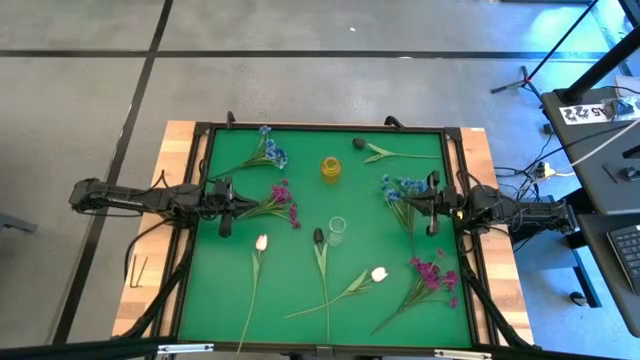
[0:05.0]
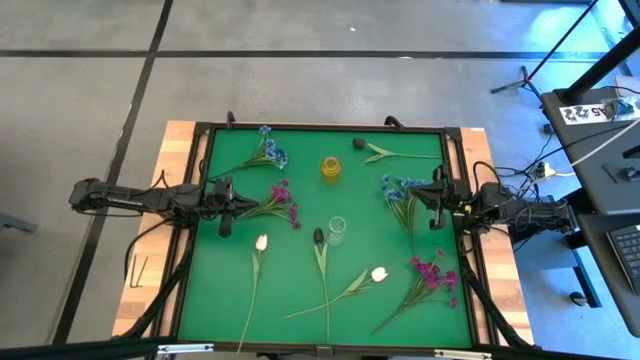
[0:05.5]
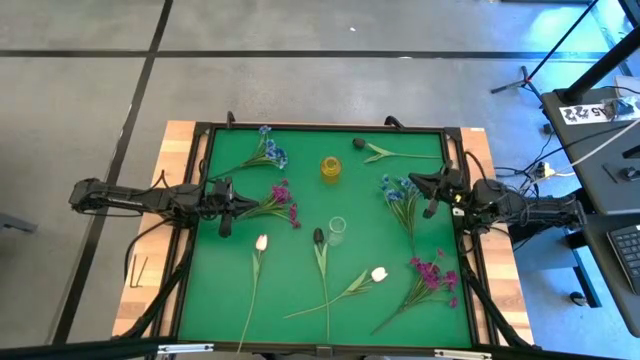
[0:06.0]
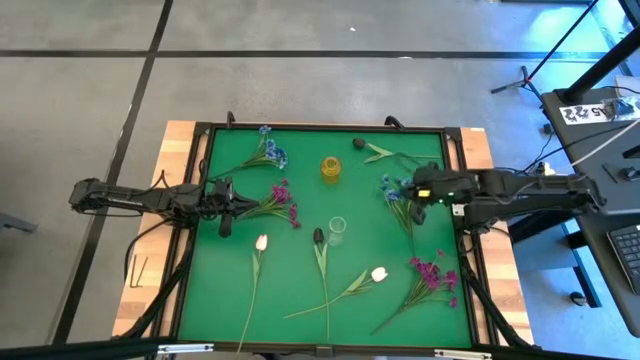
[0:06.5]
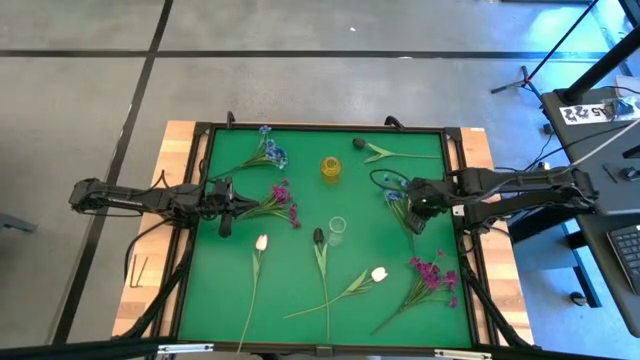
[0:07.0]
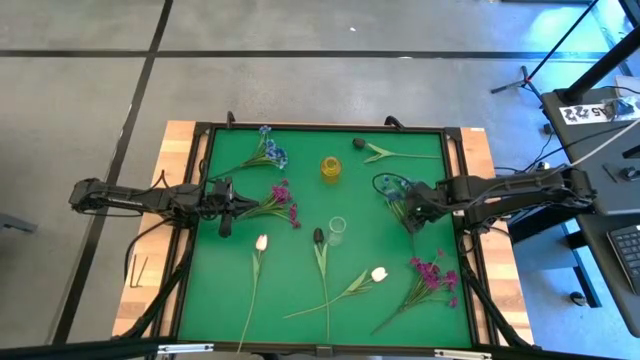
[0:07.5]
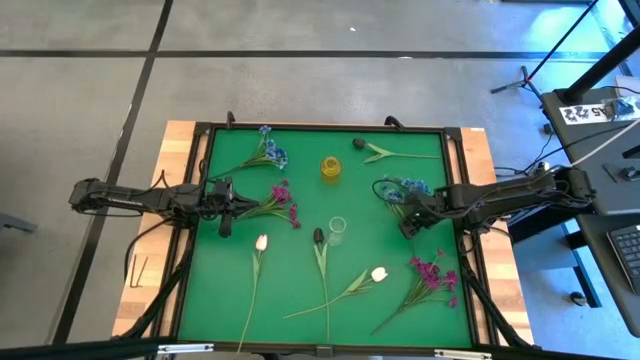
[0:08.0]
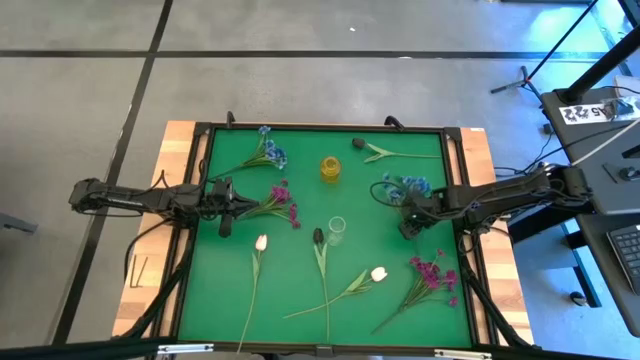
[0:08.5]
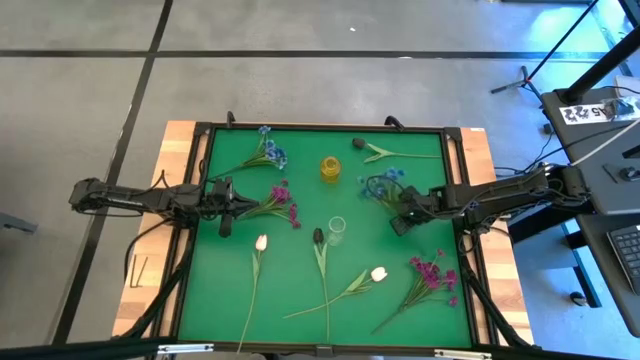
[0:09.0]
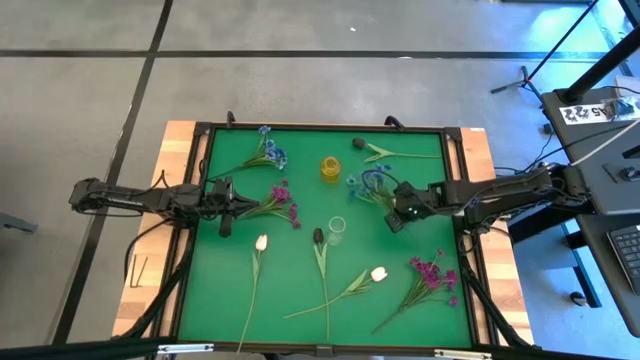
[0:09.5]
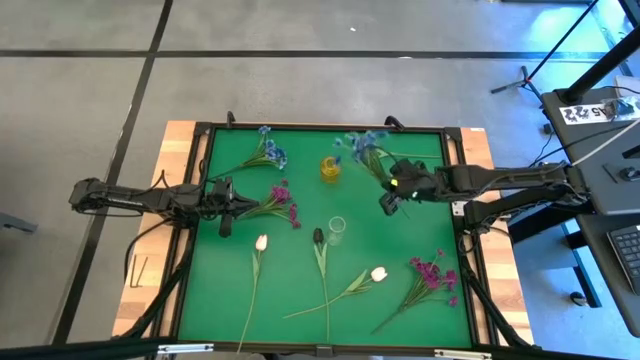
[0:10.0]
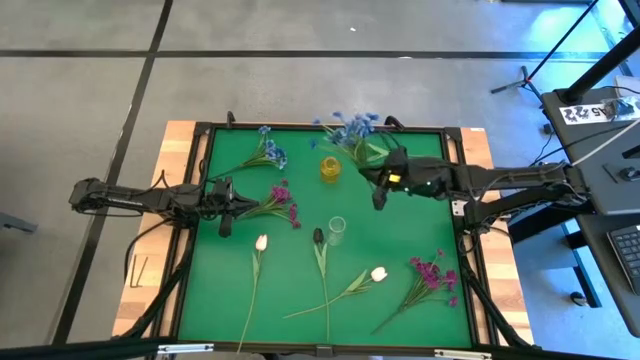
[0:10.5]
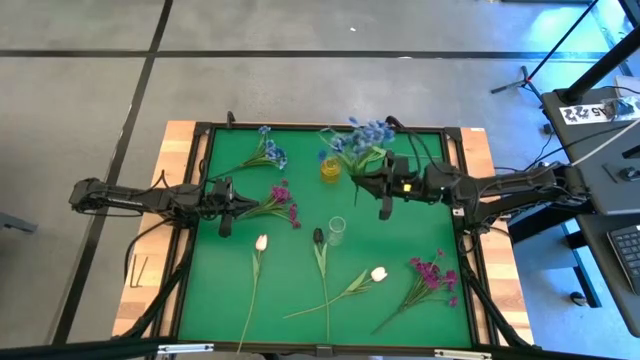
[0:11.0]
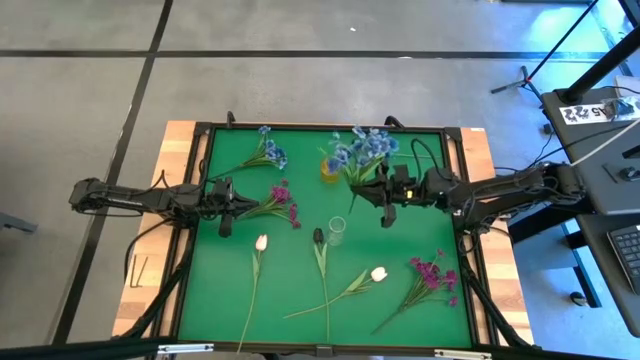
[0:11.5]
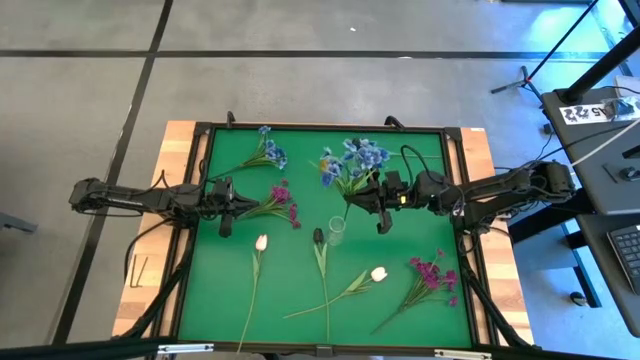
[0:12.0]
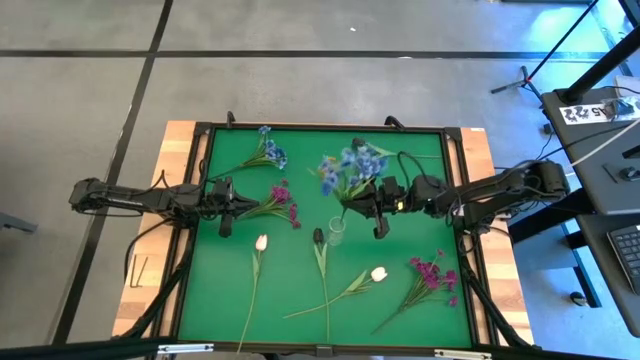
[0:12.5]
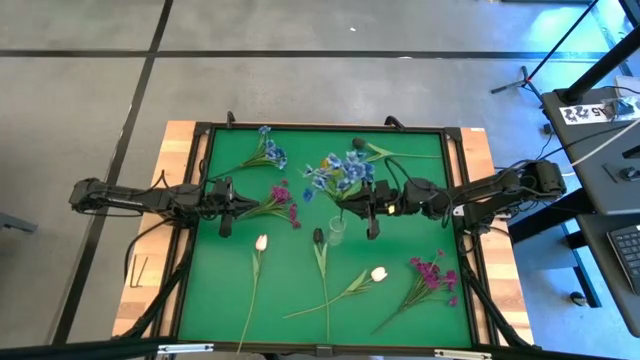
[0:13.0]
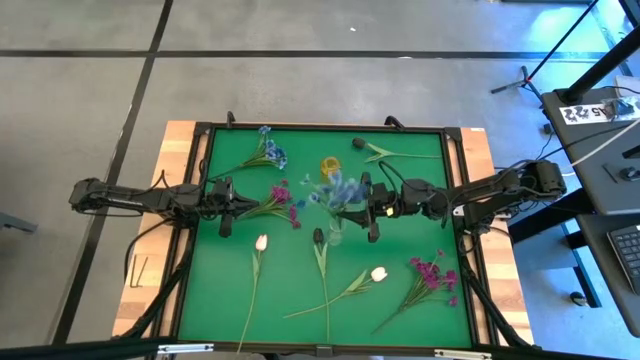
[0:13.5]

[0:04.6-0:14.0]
Task: Sort flowers into vase by color
Put the right blue flowers into the transparent vase

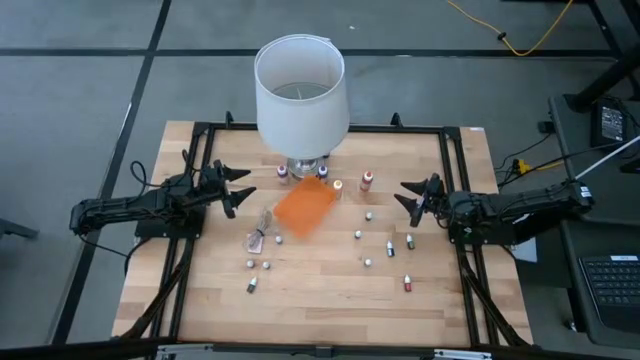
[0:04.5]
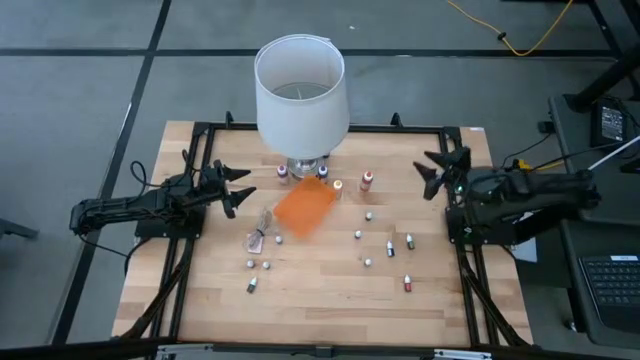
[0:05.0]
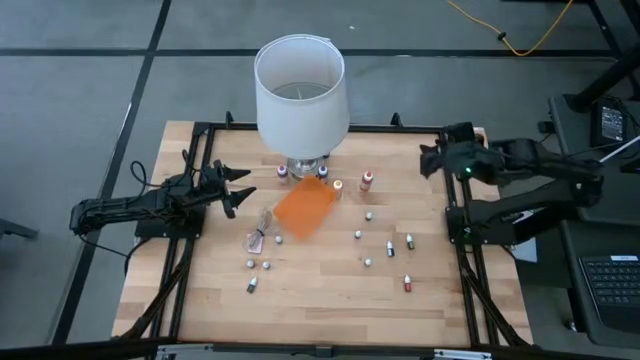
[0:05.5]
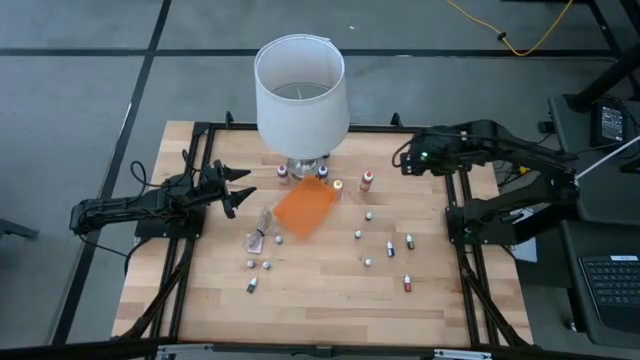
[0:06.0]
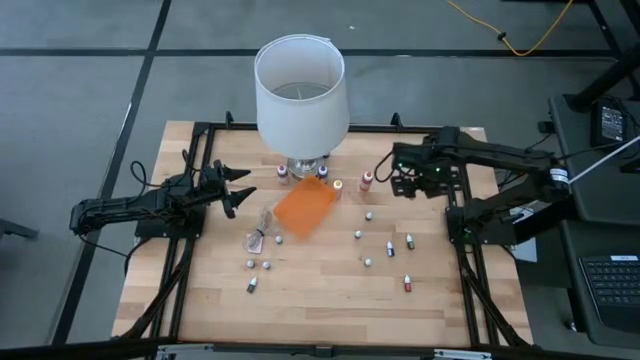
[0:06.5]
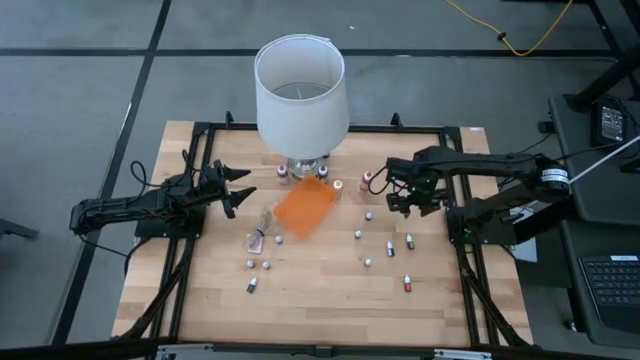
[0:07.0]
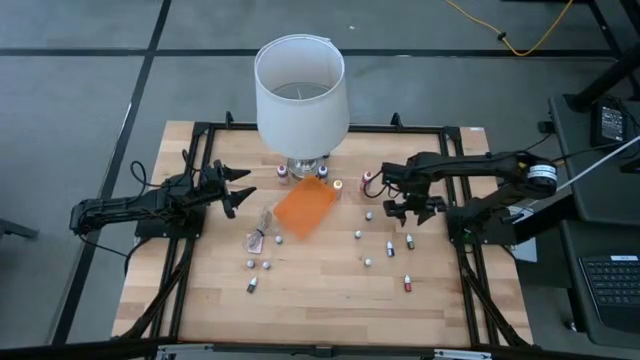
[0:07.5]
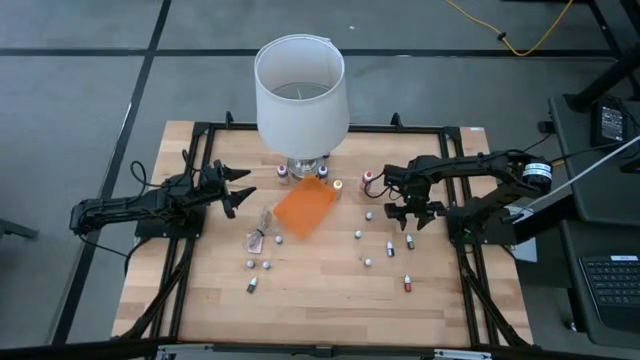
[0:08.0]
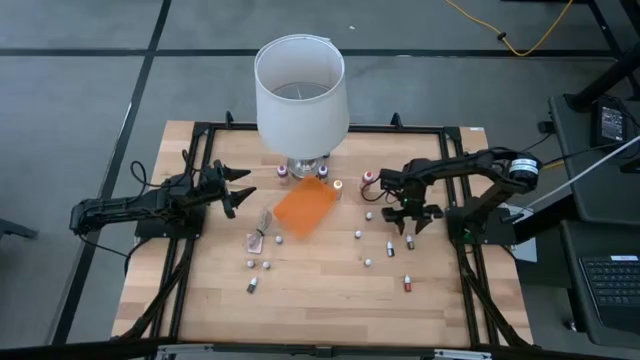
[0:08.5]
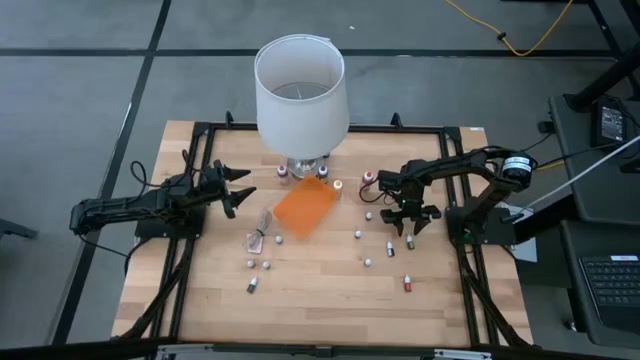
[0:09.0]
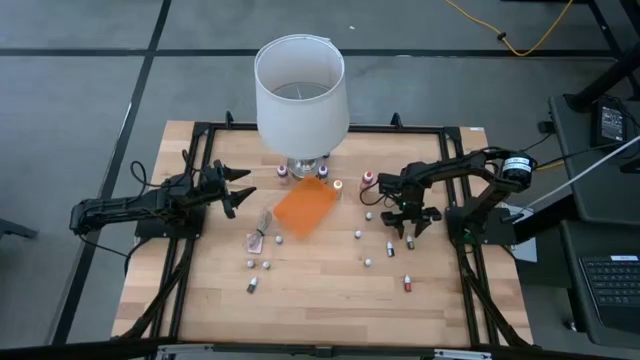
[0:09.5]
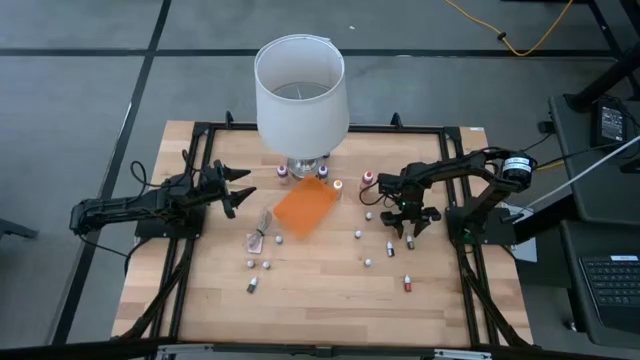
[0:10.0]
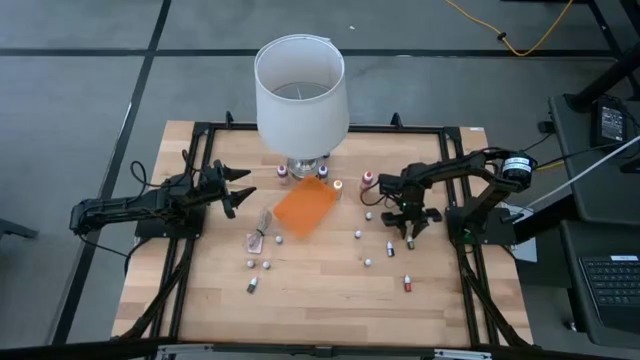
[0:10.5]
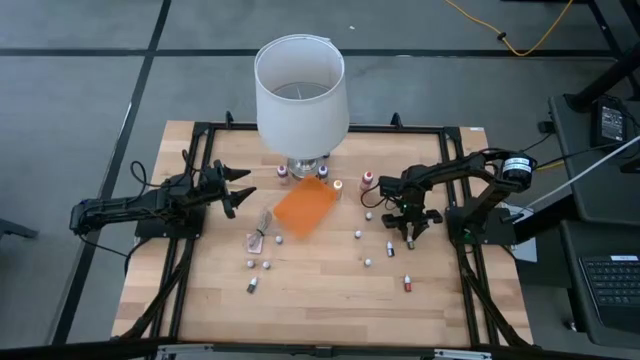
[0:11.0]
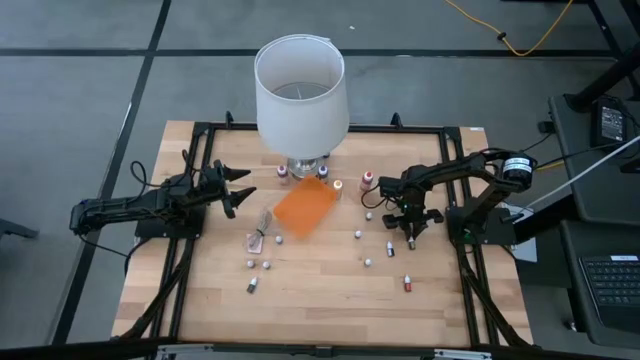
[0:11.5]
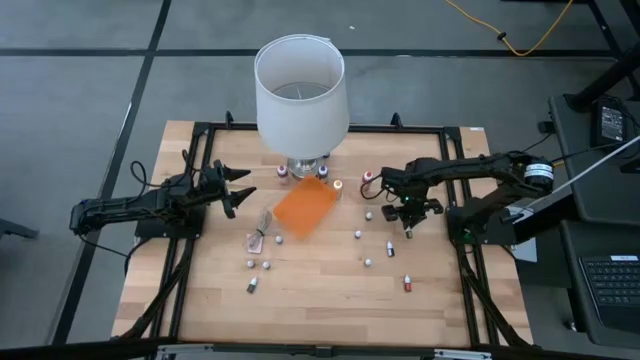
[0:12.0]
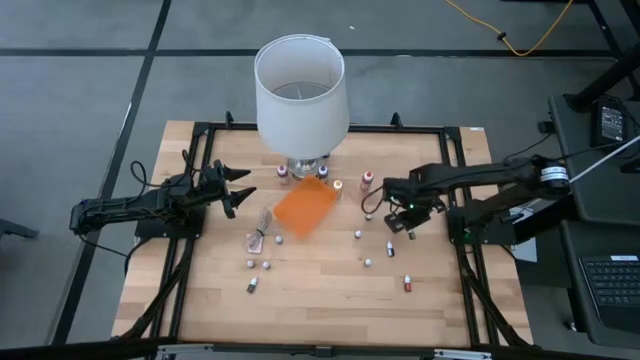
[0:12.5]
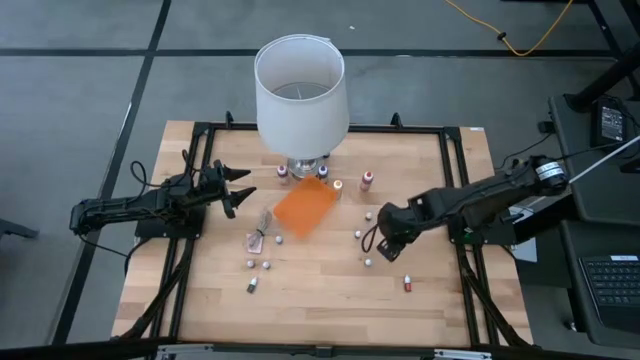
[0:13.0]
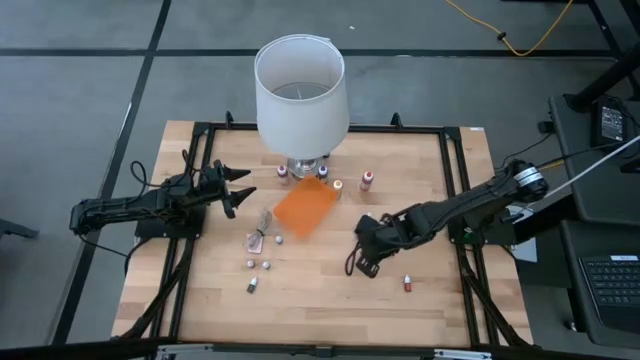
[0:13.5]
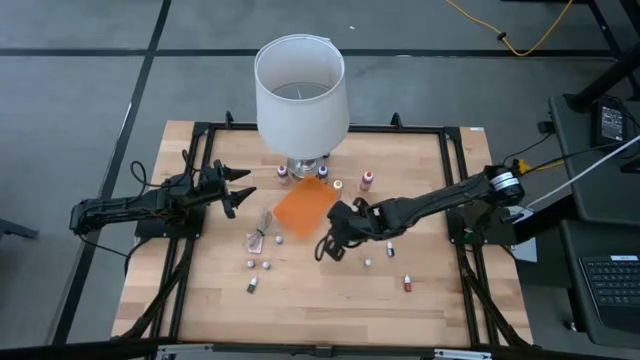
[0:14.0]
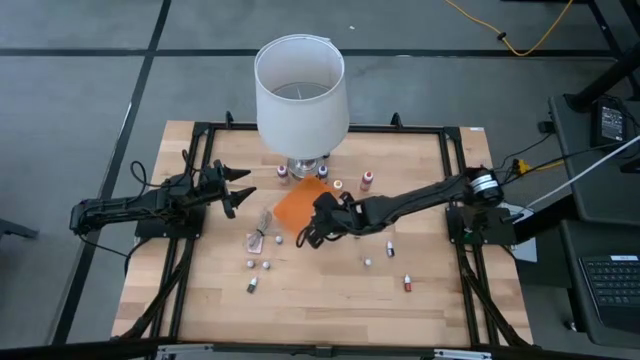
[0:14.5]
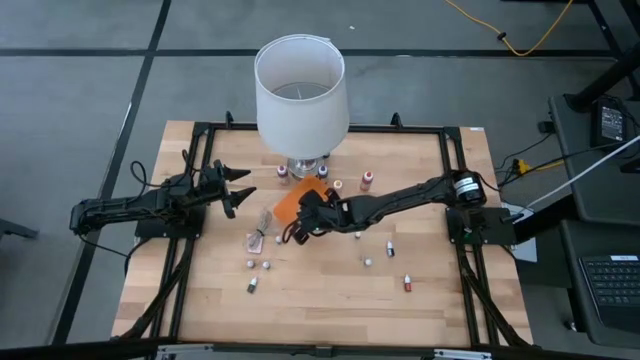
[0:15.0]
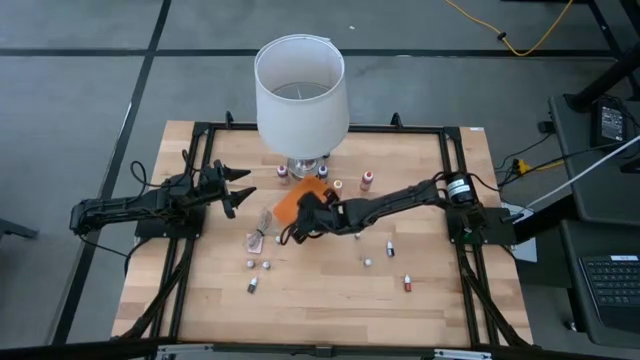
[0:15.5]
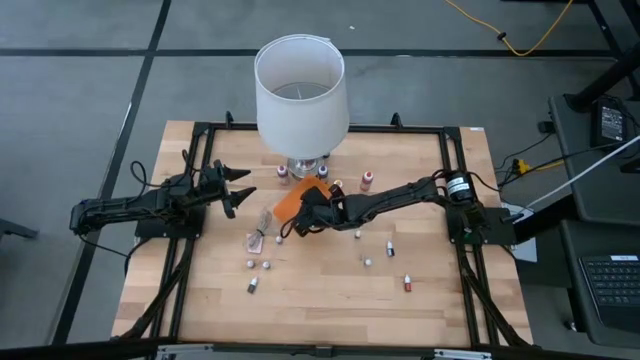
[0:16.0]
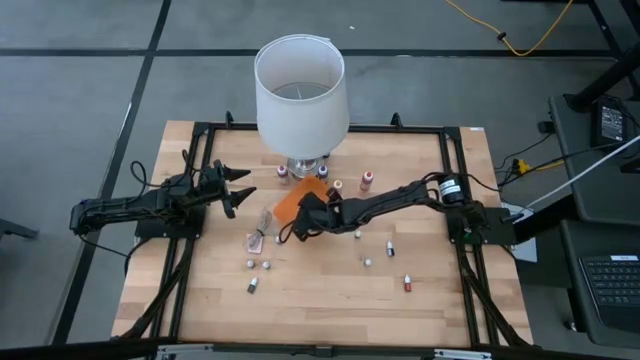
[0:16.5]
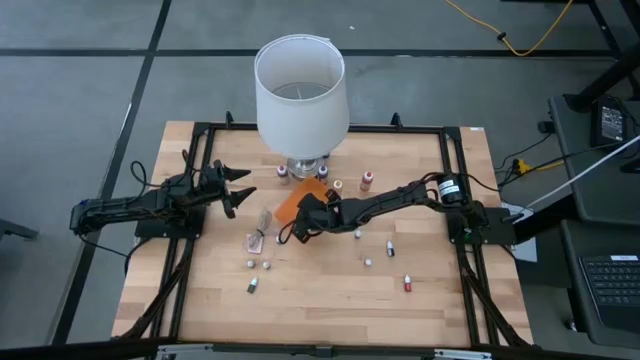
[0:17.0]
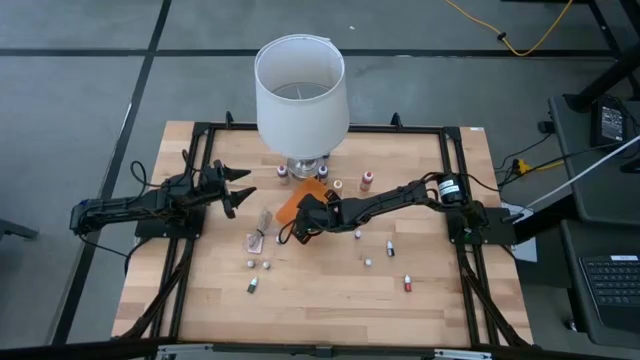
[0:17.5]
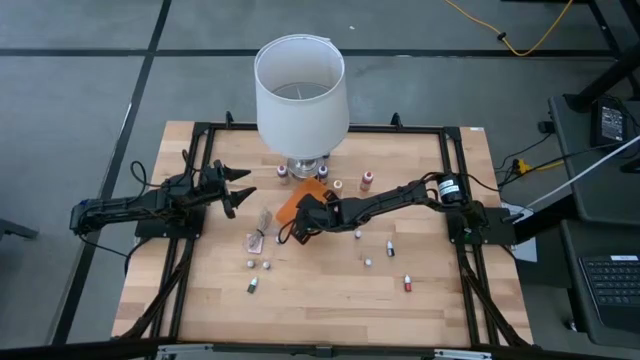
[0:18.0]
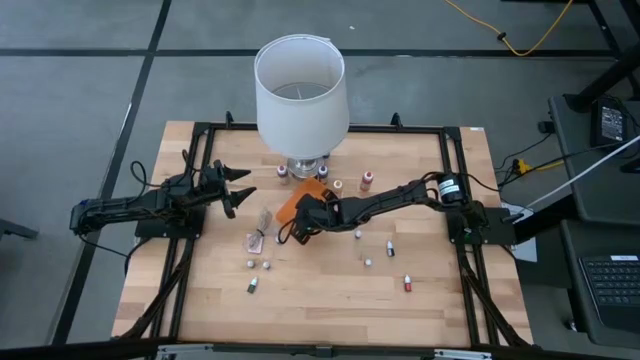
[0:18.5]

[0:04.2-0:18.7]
Task: Pick & Place food coloring
Put the small green food coloring bottle into the orange bin
